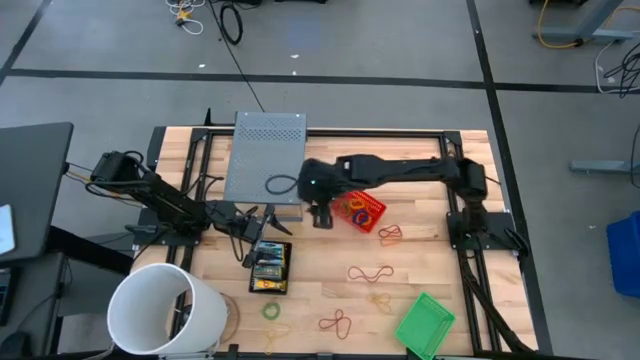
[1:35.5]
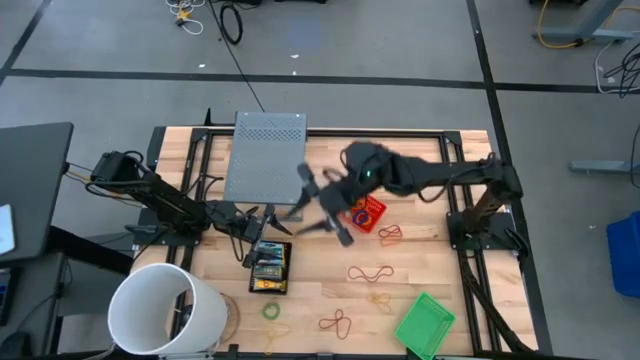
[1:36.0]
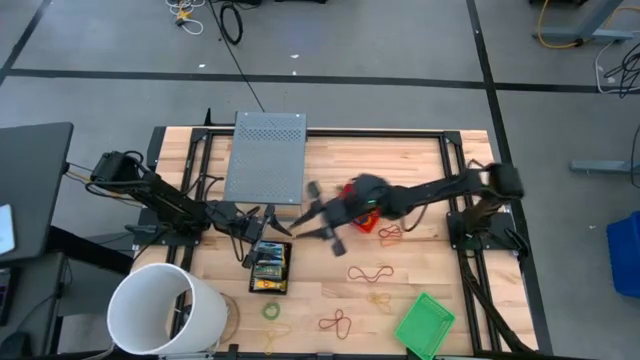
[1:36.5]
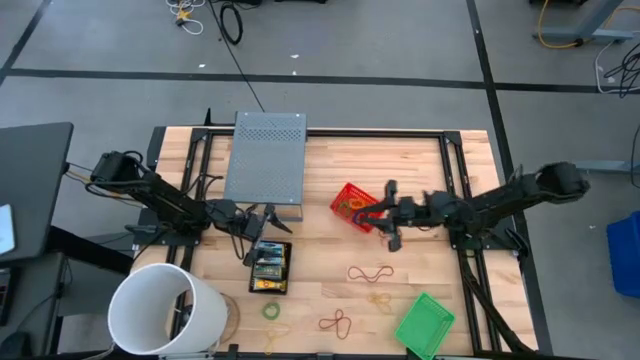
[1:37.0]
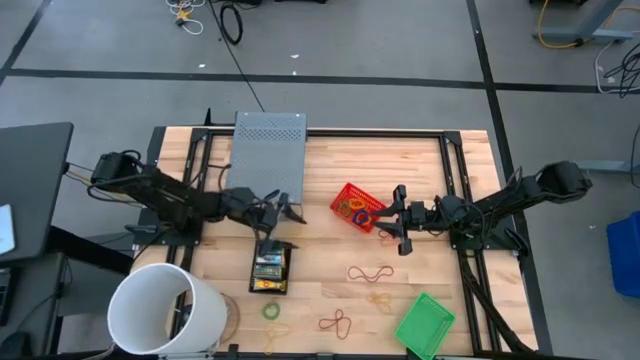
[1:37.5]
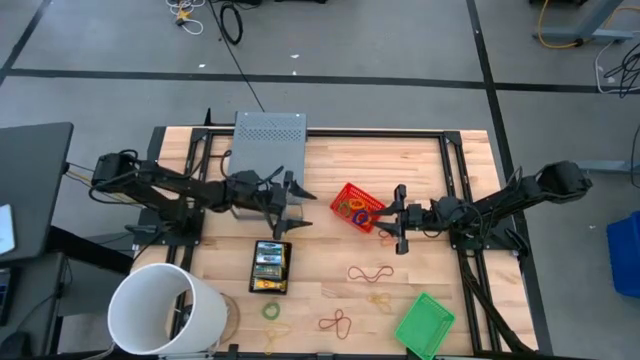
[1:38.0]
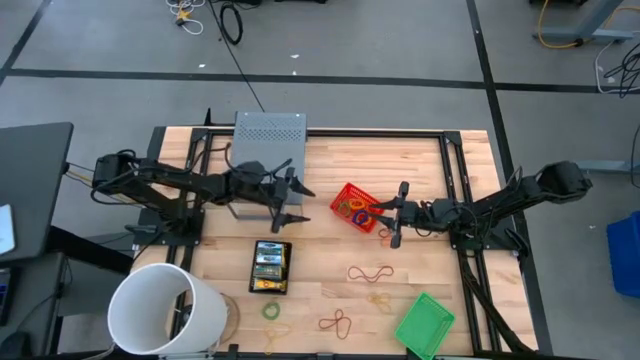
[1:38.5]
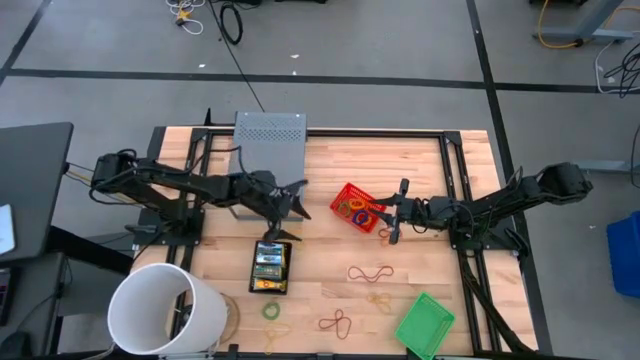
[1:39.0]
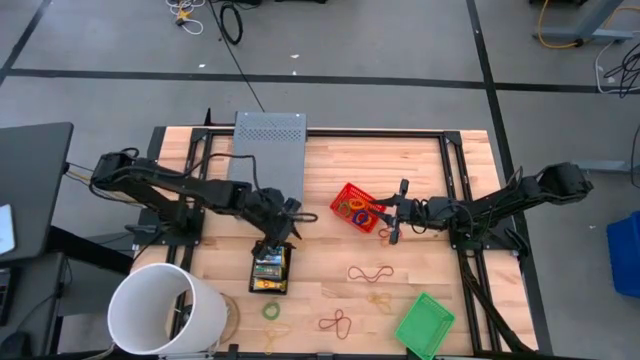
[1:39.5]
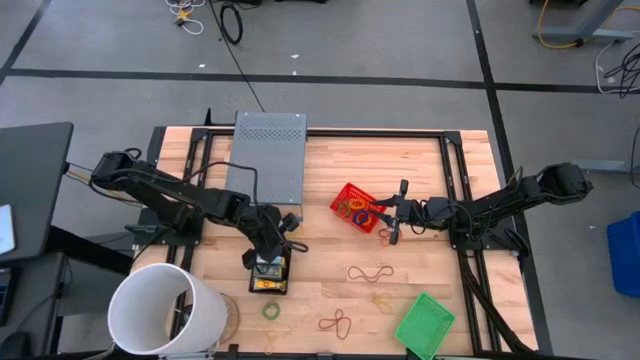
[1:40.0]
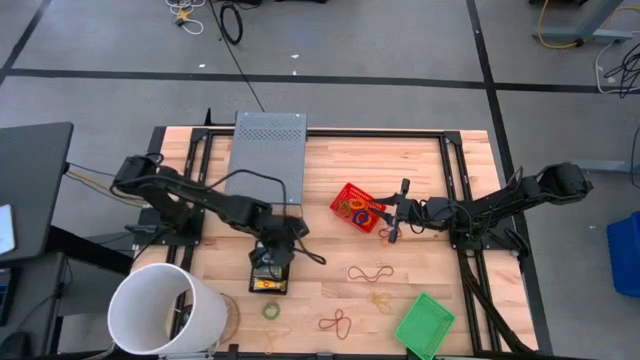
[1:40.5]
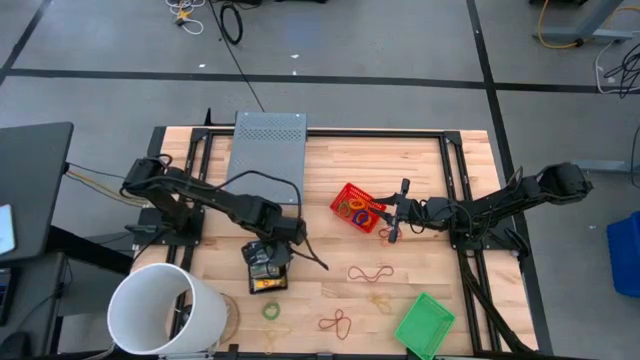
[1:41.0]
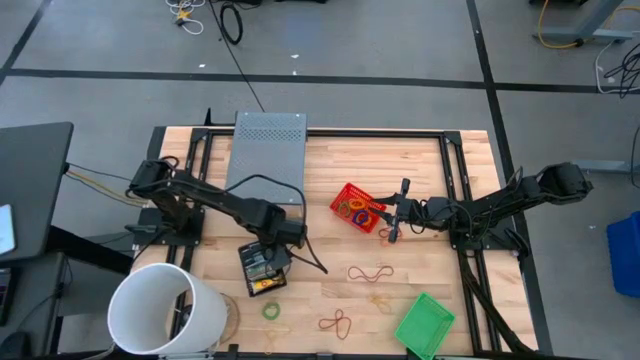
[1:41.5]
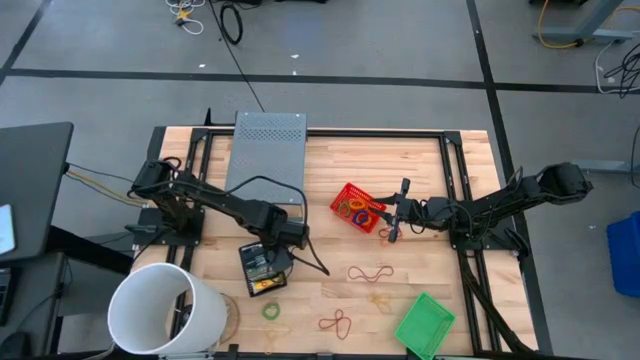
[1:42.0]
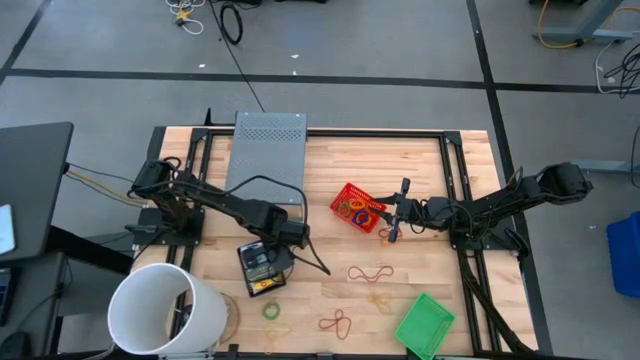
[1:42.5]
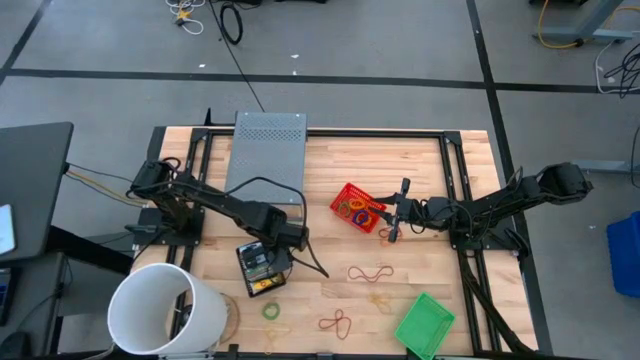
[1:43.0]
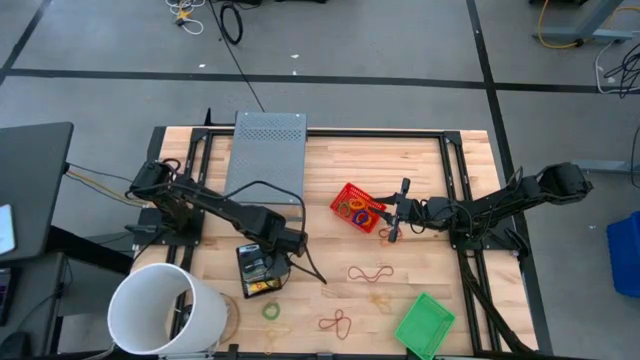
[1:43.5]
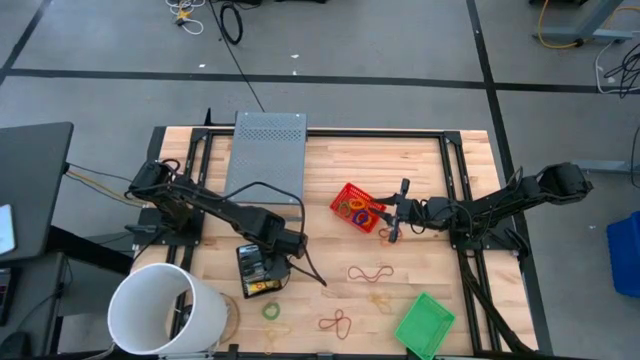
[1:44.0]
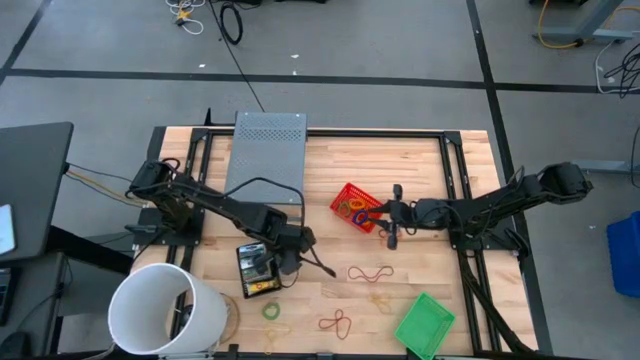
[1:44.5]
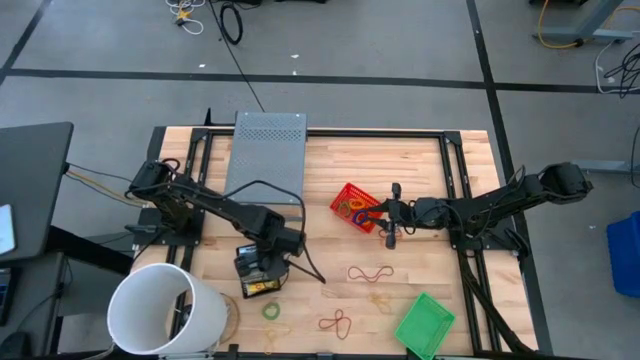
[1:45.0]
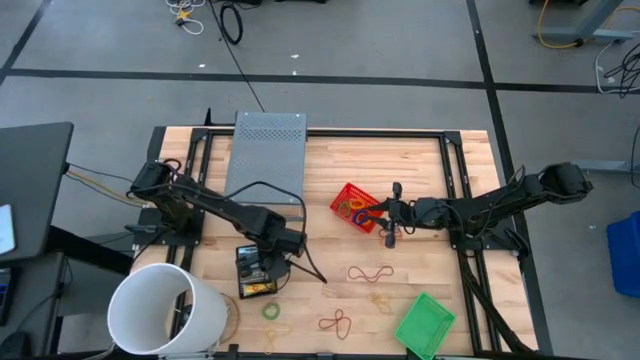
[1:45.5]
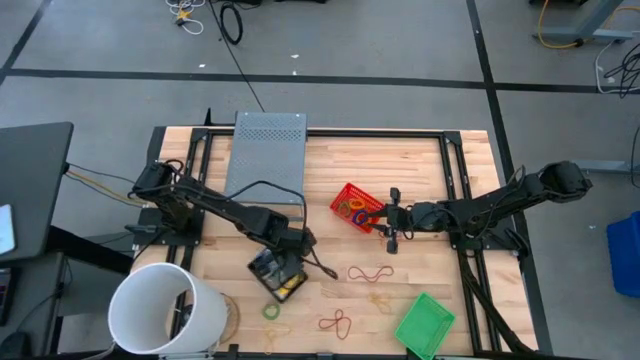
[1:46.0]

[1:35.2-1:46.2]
Task: Pick & Place Office Desk Supplies
Adjust the crayon boxes in the black basket

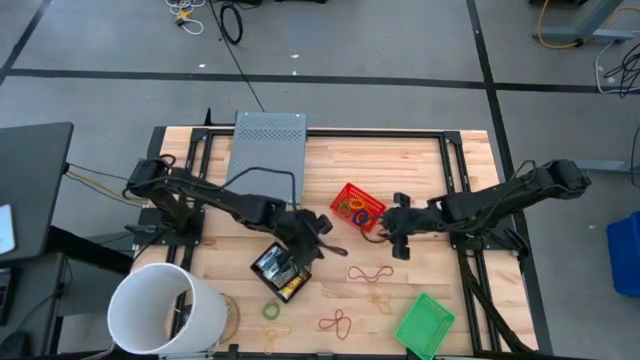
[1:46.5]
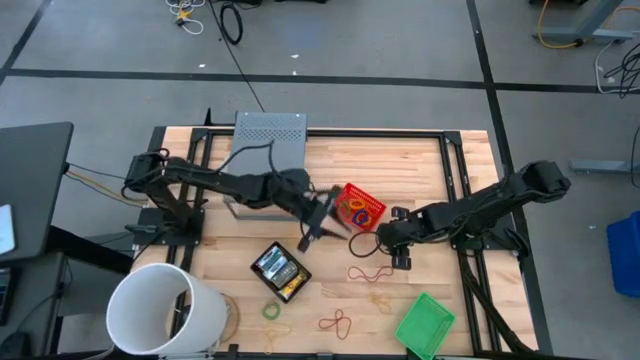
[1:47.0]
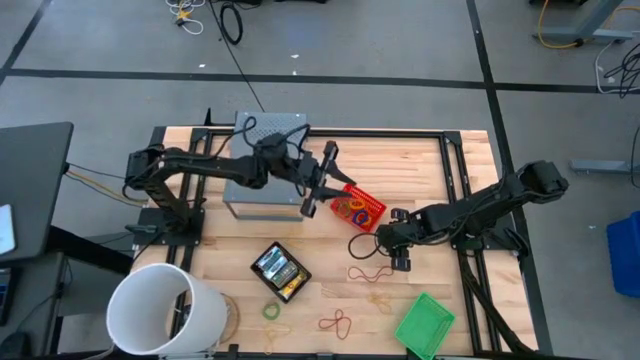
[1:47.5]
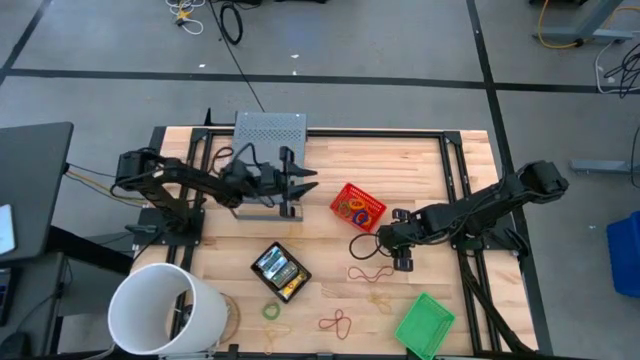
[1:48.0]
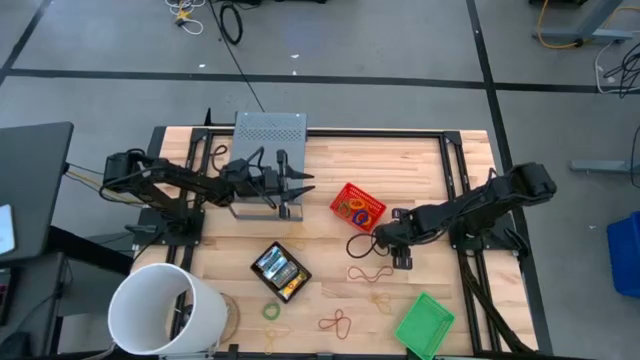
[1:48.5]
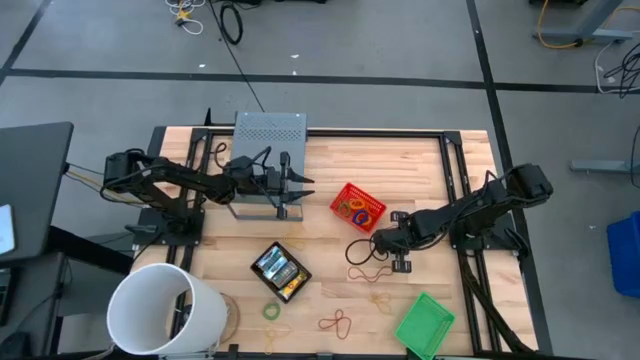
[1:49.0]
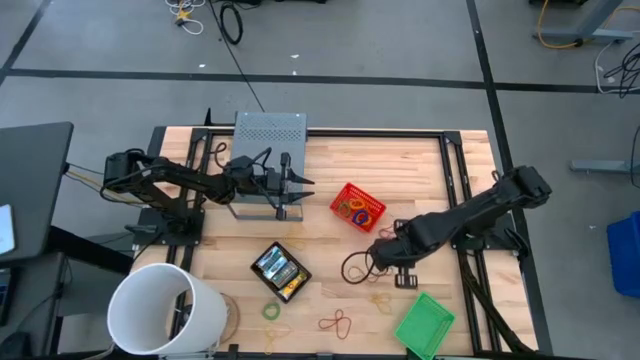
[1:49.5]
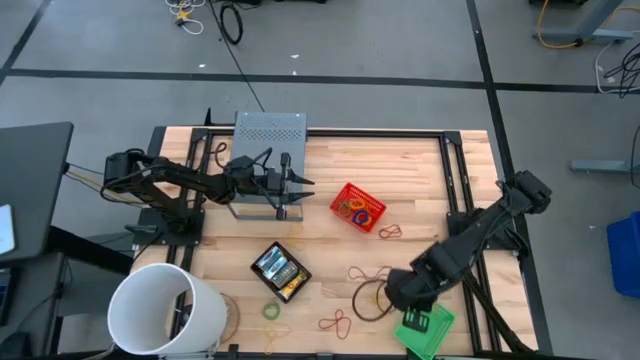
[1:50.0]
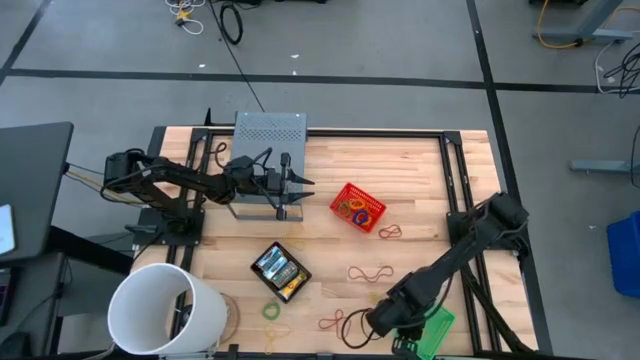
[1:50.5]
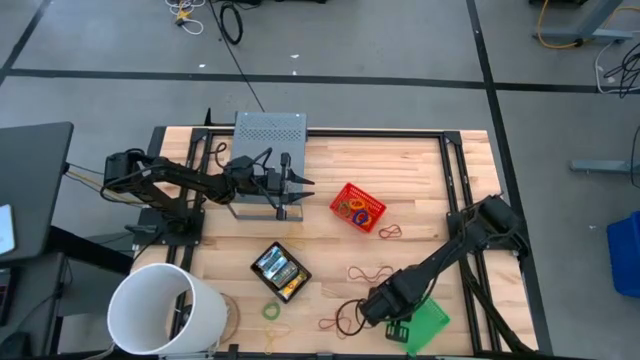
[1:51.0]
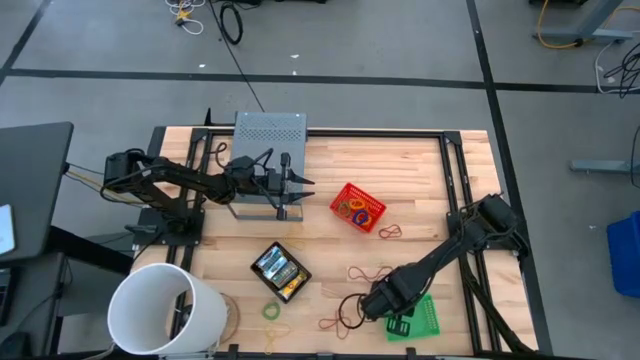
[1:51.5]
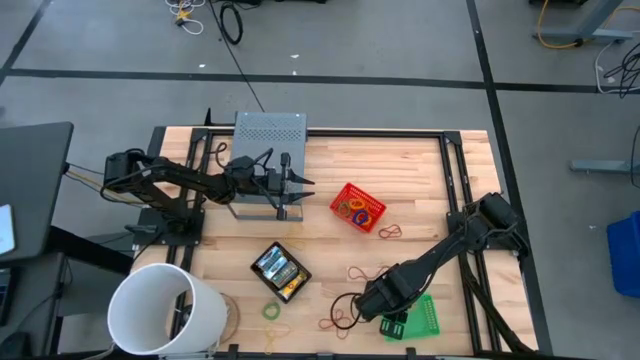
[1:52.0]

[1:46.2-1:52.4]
Put the orange rubber band into the green basket

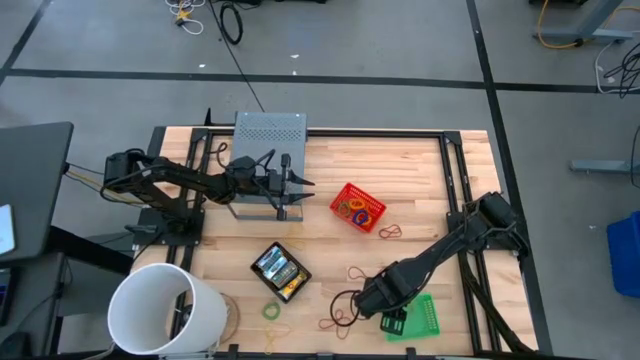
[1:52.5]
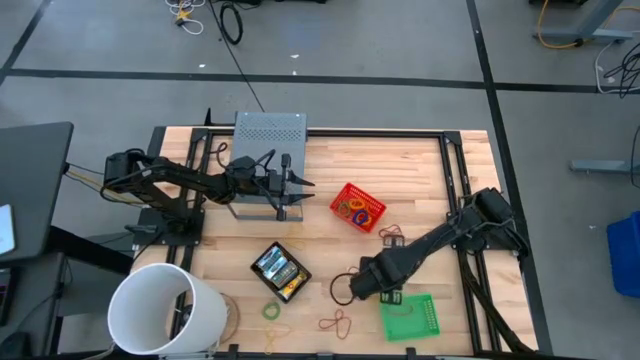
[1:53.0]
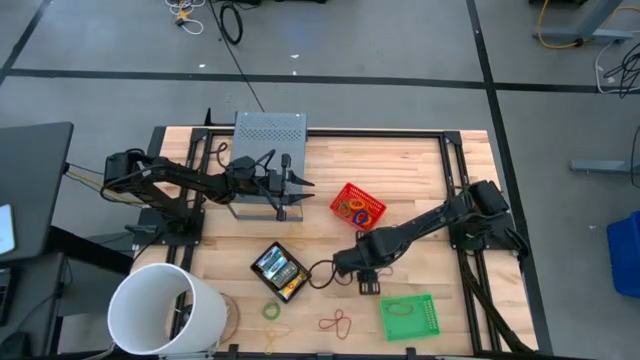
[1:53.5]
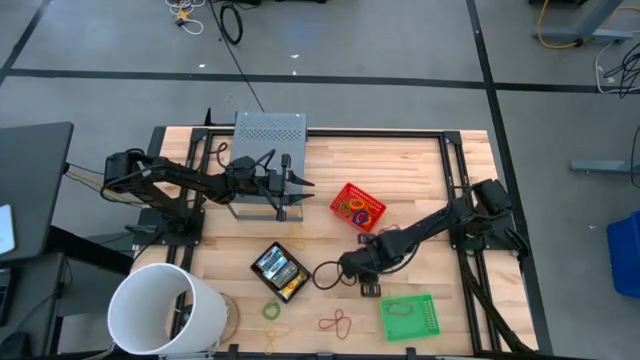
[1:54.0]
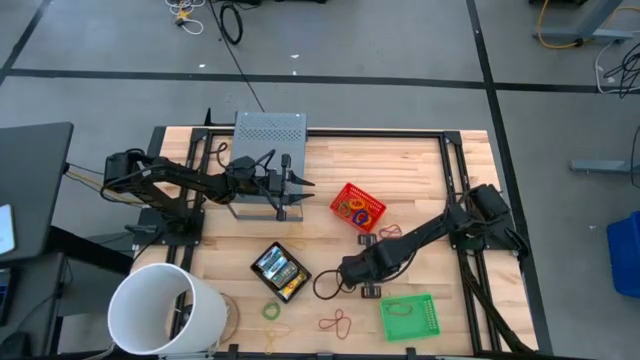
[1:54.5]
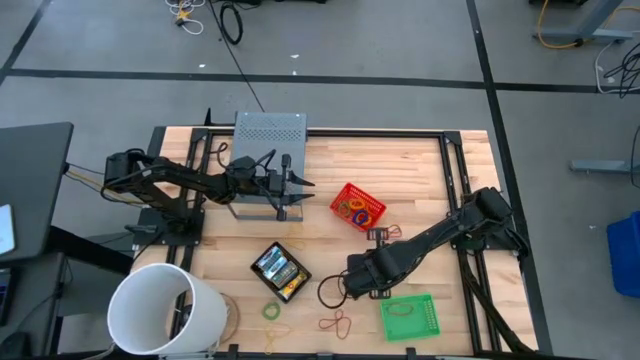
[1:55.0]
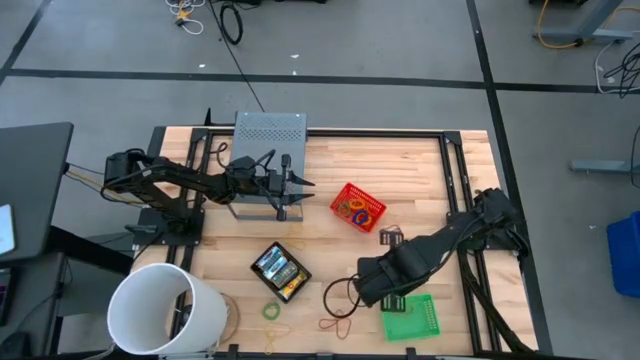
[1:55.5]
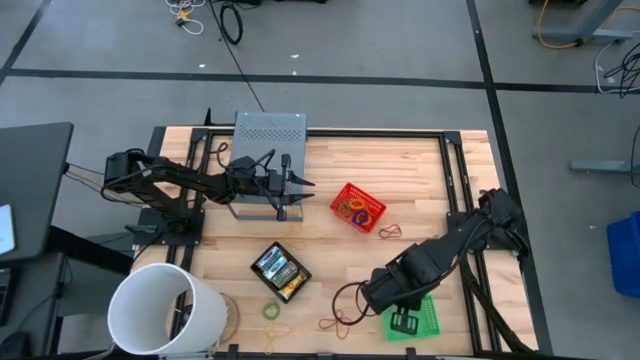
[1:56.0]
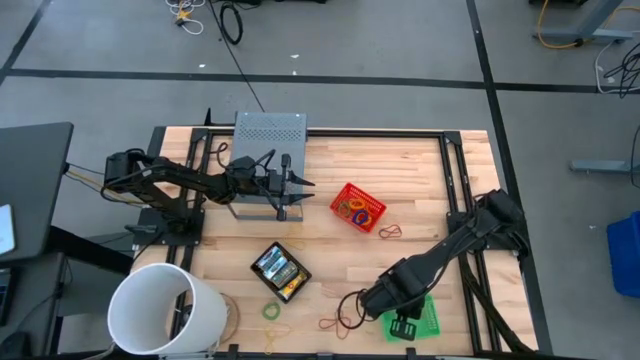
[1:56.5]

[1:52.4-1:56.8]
Put the middle red rubber band into the green basket
